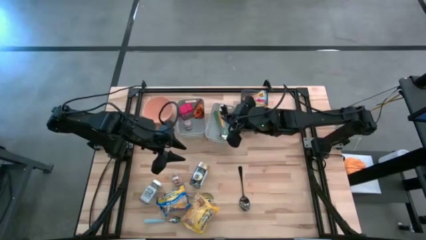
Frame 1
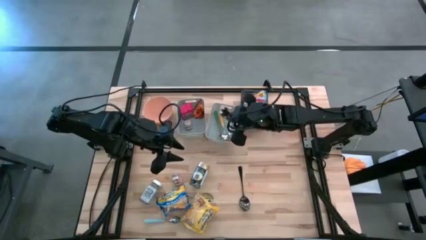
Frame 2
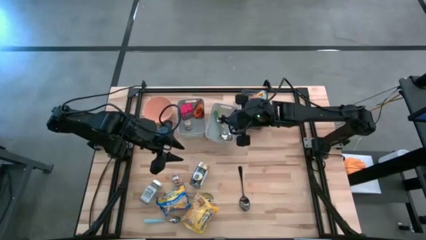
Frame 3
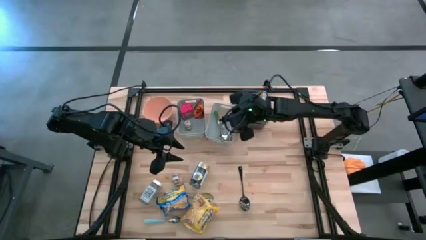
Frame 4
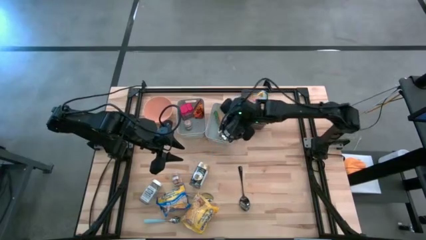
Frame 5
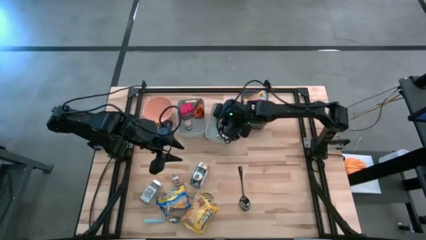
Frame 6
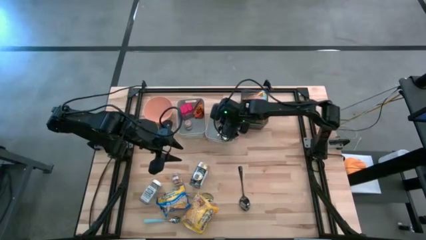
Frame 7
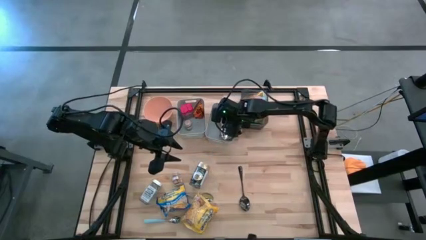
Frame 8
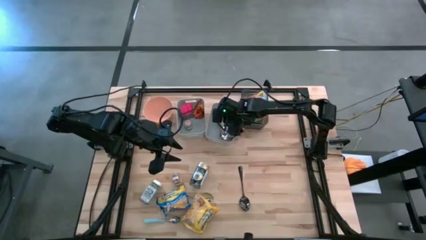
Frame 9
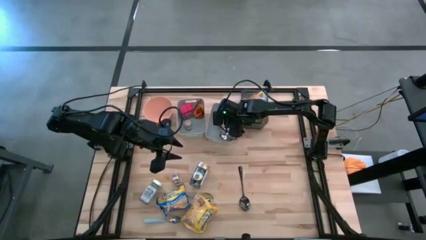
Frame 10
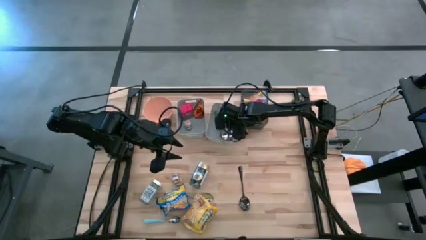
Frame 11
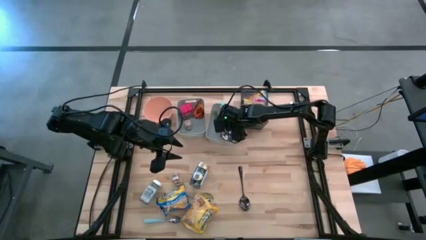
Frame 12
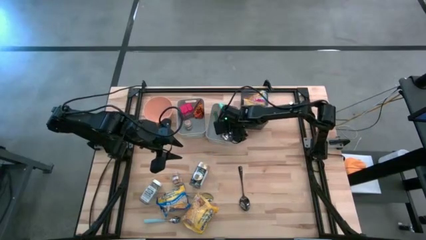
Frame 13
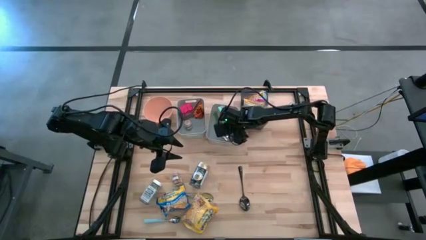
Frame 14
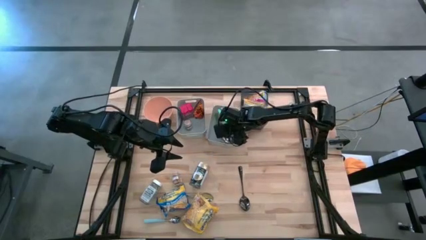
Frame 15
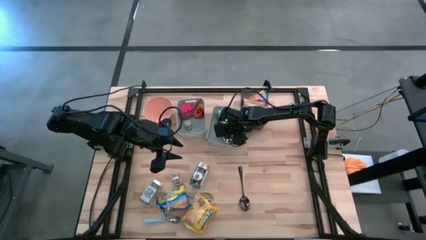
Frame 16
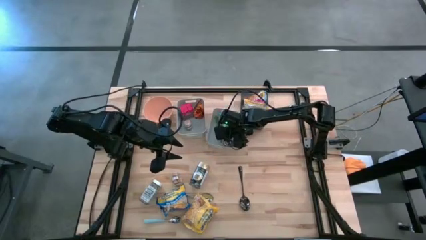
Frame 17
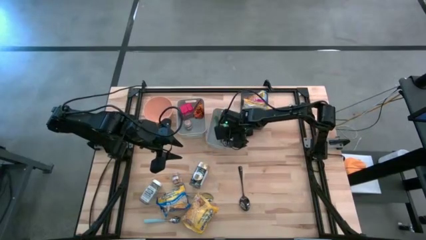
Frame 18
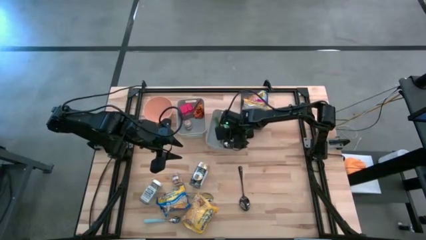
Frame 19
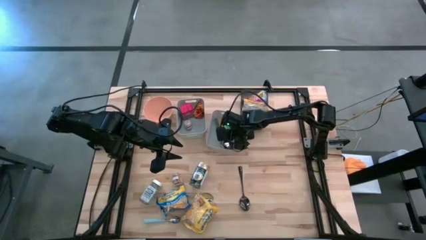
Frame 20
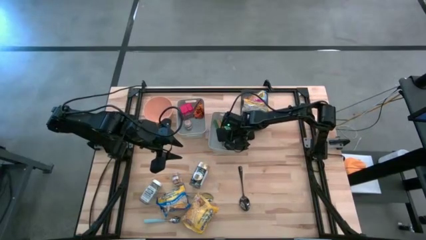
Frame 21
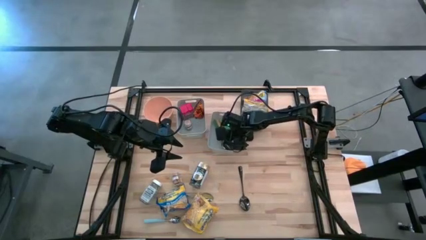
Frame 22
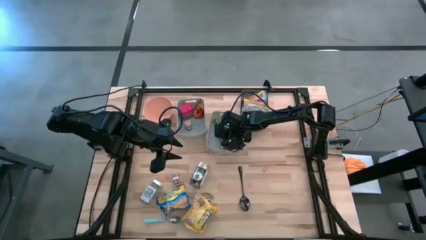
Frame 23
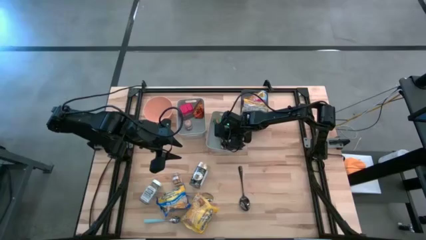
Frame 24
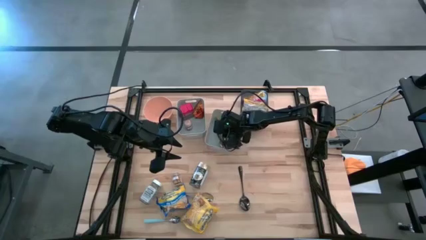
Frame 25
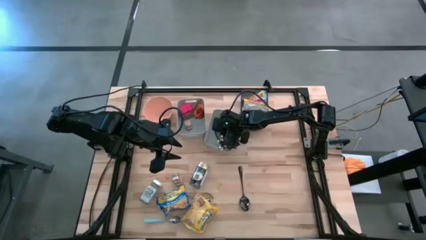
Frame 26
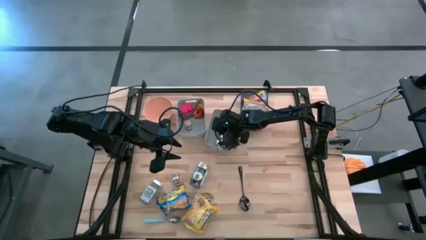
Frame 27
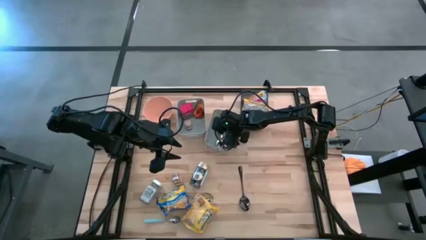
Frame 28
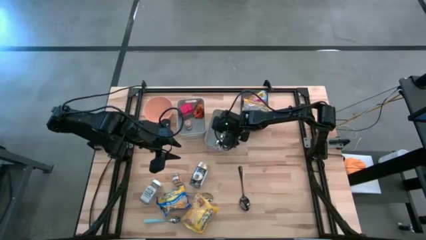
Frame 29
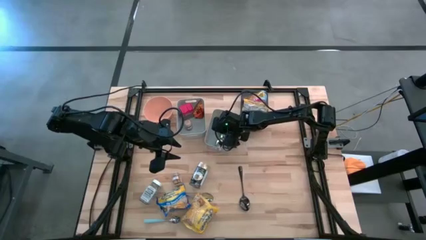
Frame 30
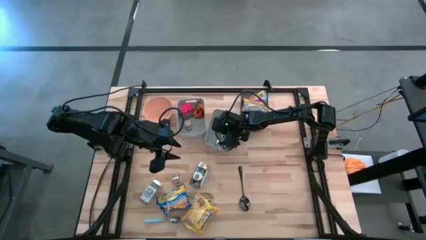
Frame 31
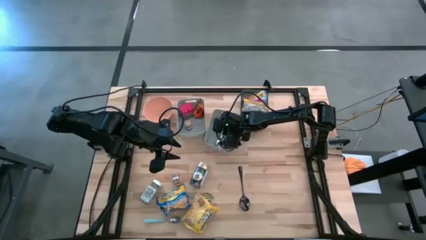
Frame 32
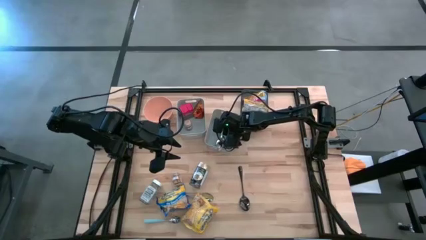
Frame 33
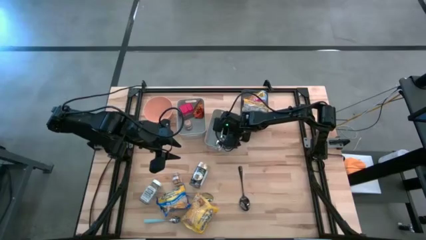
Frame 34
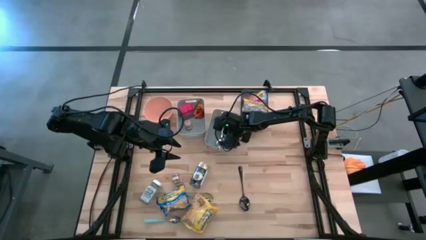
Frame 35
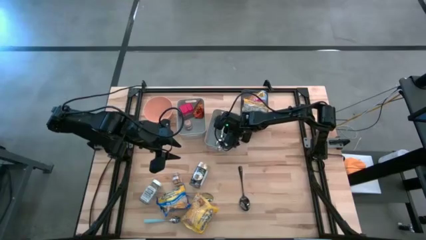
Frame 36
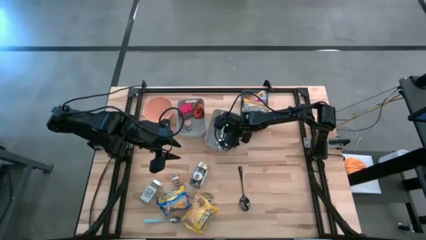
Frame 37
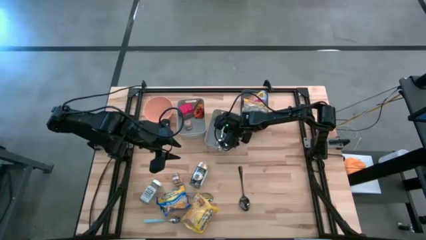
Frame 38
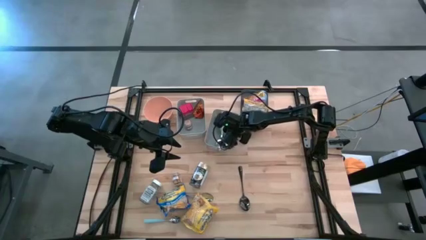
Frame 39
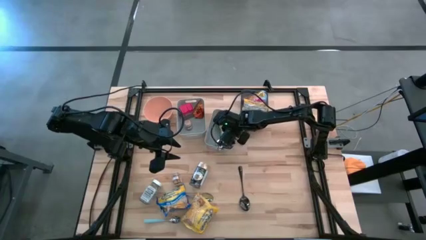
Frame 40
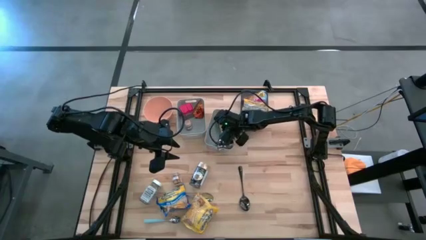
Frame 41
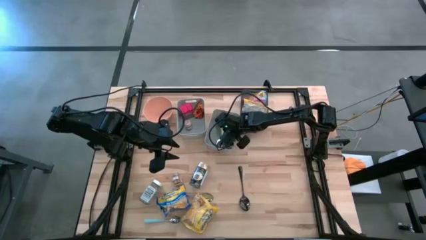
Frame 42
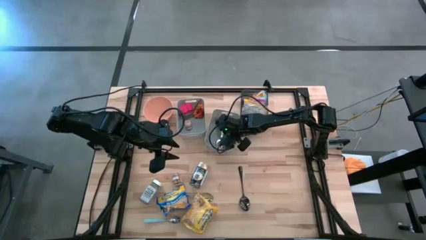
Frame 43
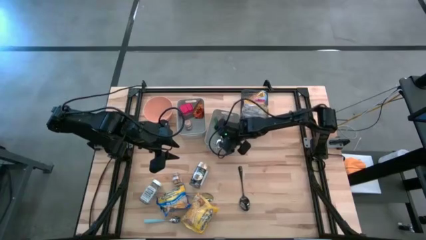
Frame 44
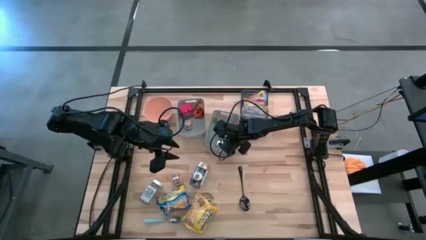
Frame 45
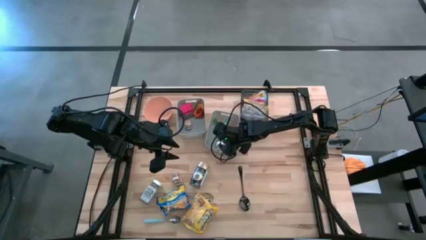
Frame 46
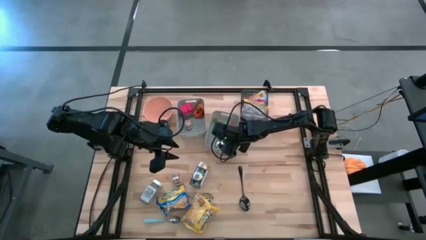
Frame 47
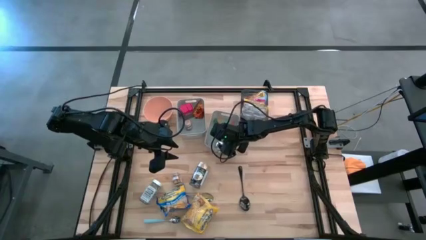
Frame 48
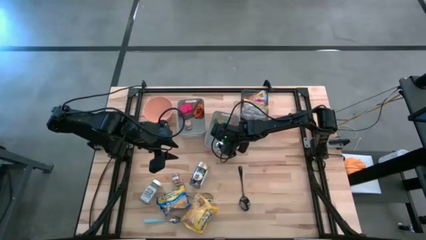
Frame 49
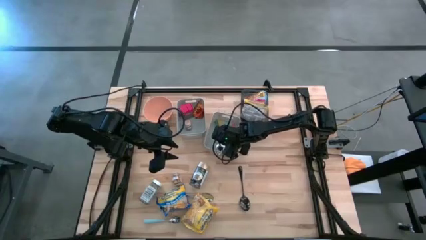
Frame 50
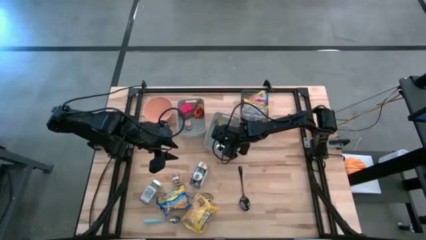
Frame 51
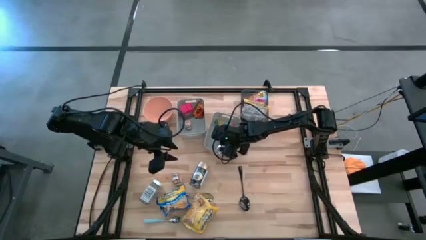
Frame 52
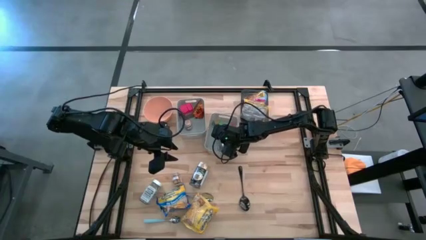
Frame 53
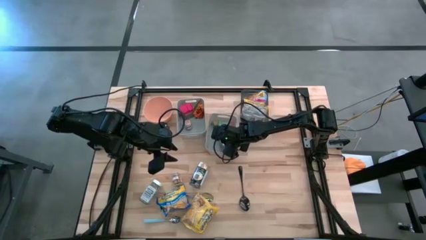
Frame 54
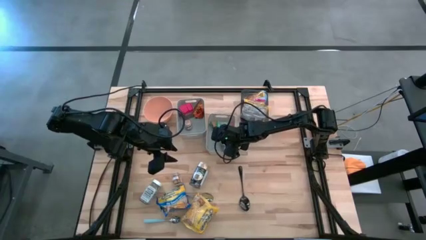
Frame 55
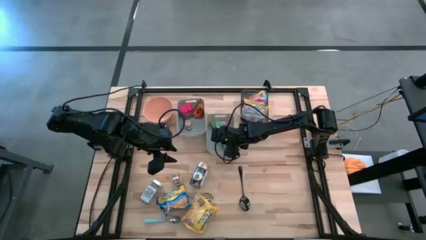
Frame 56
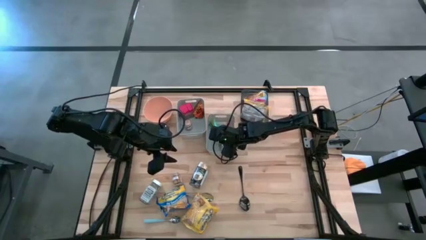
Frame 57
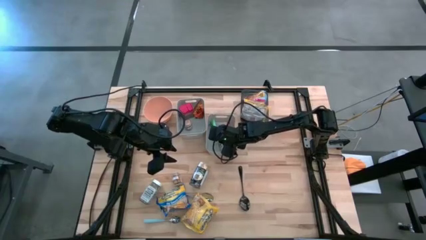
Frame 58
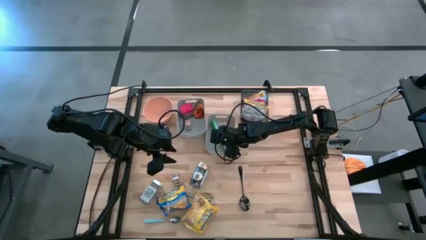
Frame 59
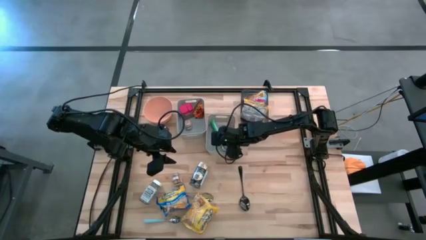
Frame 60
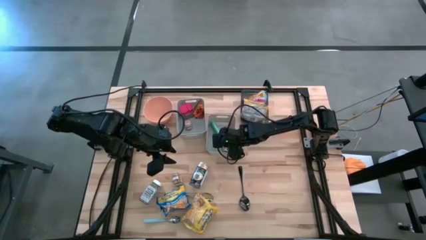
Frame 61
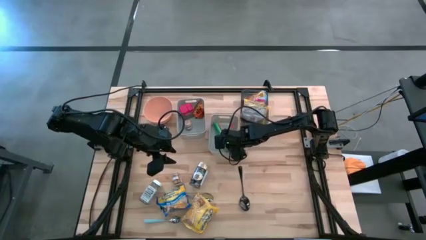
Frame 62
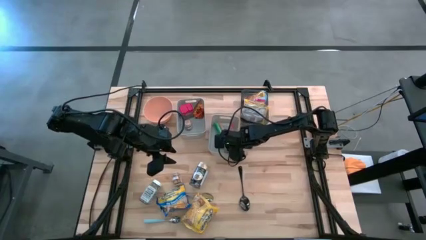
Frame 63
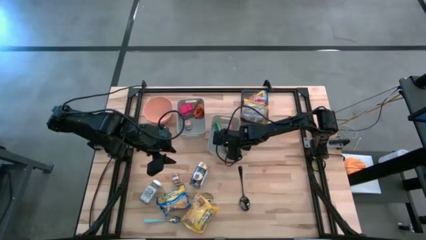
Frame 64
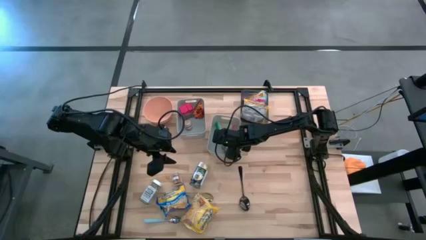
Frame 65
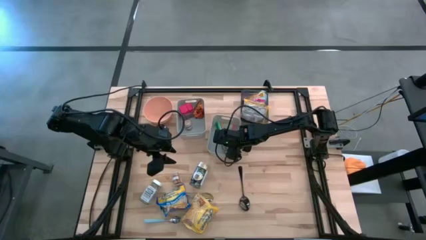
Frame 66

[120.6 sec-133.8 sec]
Put the blue green spoon into the right gray bin
